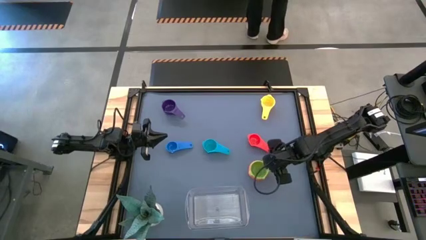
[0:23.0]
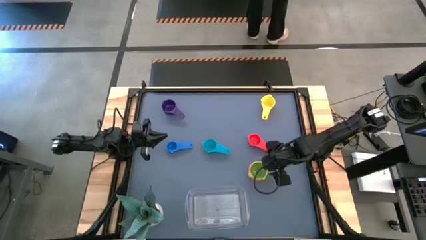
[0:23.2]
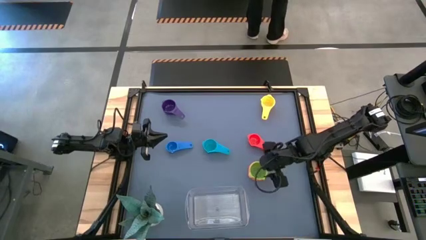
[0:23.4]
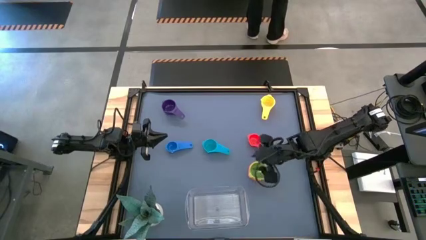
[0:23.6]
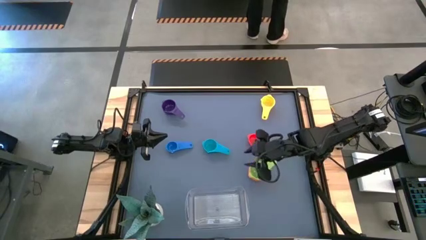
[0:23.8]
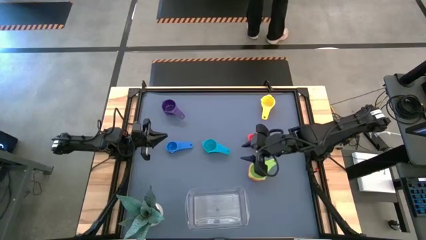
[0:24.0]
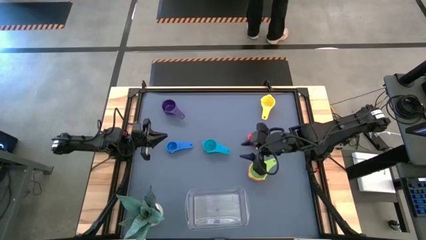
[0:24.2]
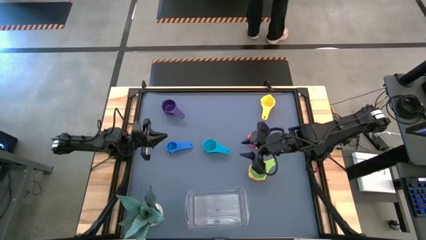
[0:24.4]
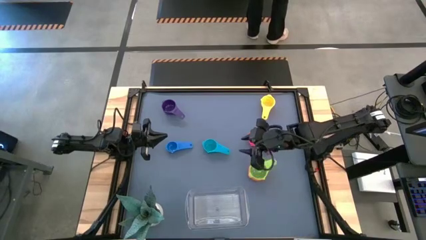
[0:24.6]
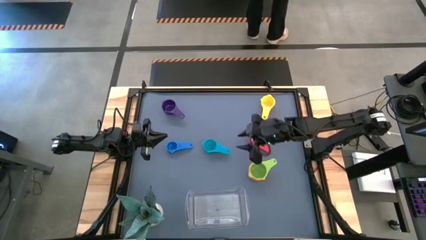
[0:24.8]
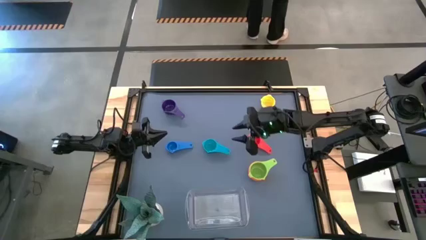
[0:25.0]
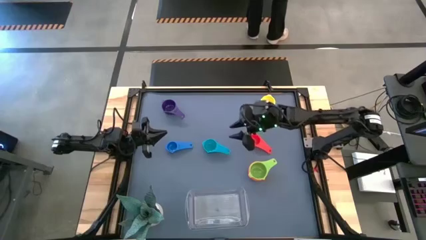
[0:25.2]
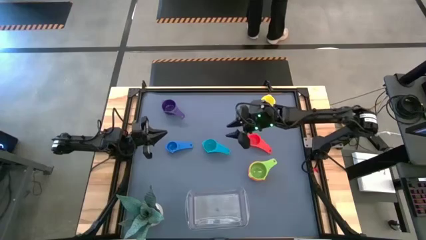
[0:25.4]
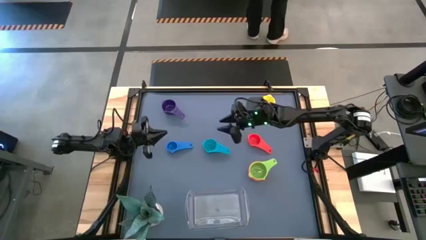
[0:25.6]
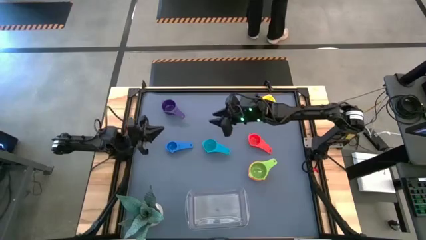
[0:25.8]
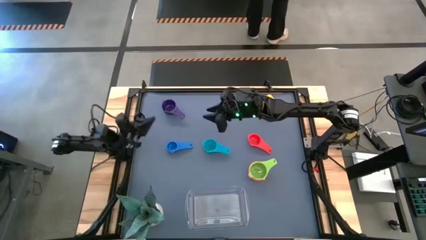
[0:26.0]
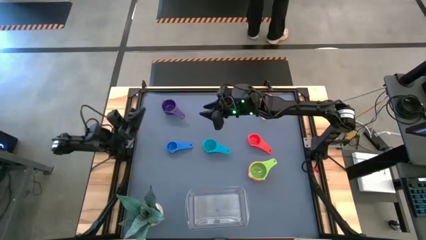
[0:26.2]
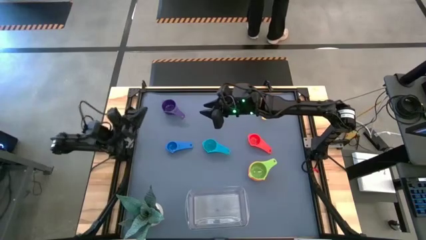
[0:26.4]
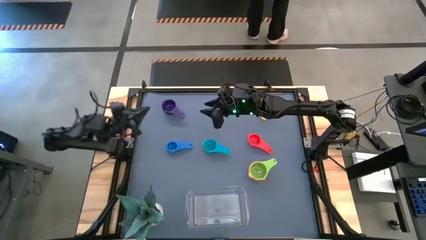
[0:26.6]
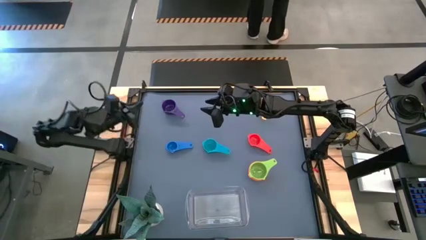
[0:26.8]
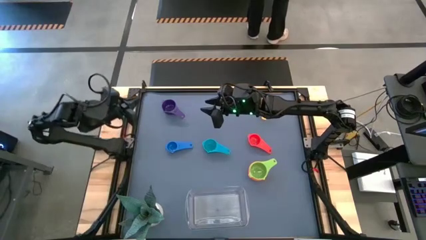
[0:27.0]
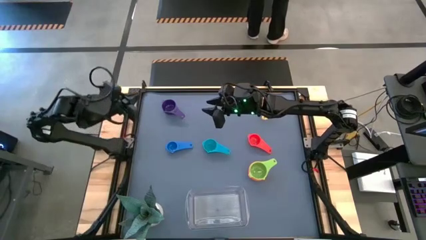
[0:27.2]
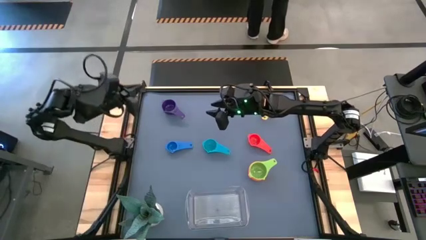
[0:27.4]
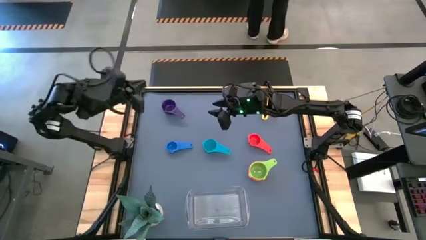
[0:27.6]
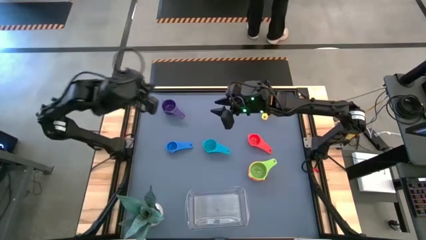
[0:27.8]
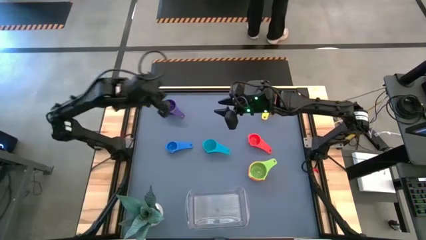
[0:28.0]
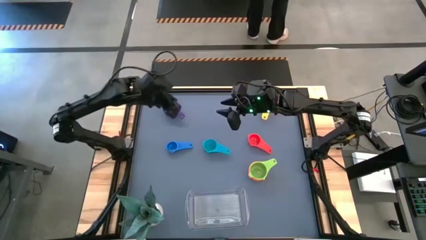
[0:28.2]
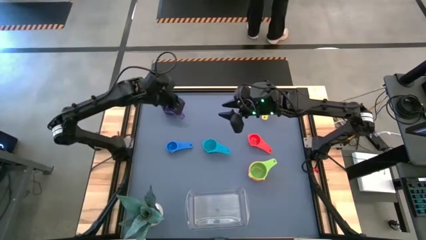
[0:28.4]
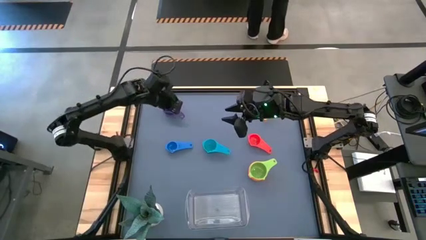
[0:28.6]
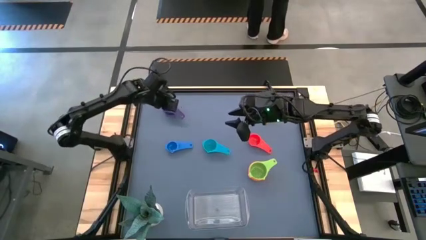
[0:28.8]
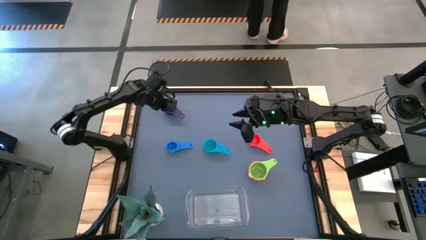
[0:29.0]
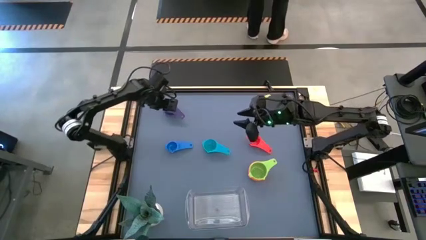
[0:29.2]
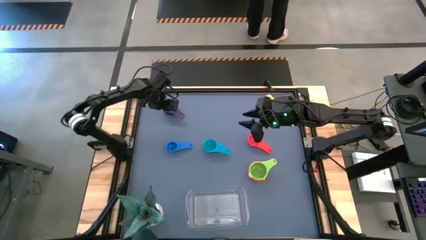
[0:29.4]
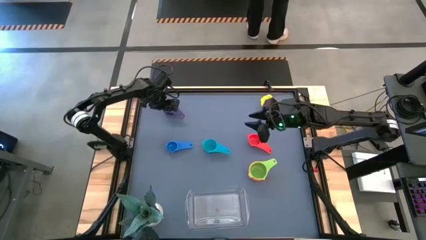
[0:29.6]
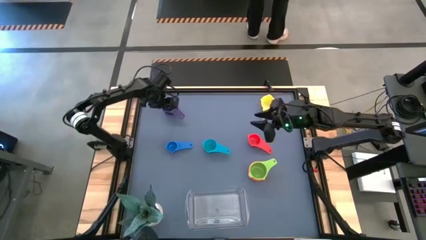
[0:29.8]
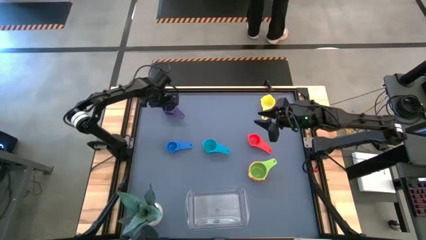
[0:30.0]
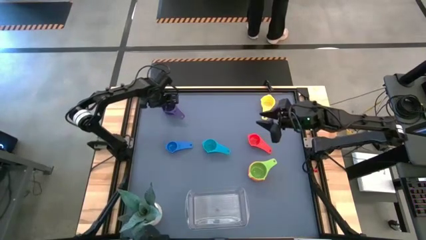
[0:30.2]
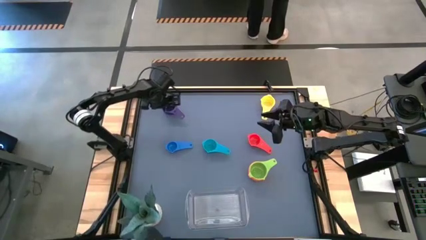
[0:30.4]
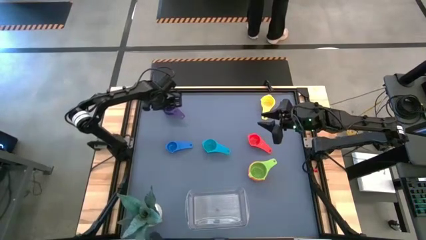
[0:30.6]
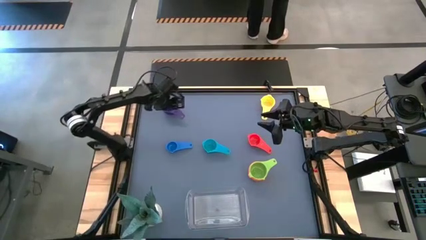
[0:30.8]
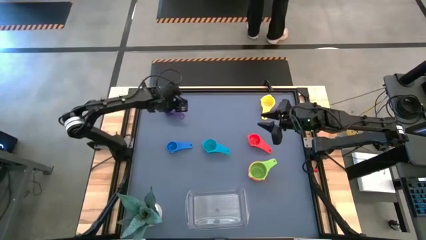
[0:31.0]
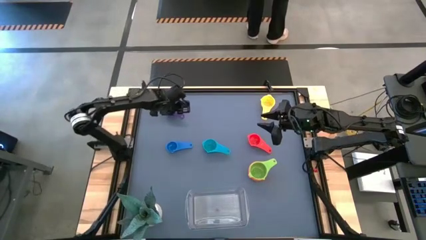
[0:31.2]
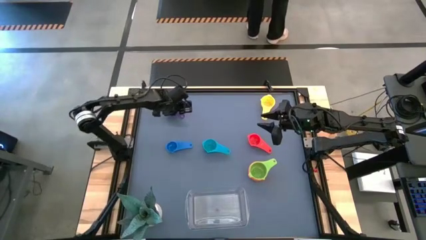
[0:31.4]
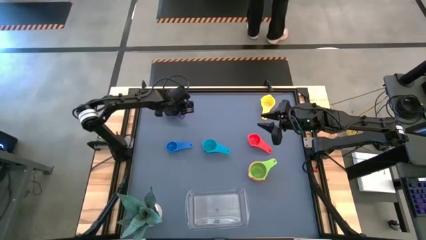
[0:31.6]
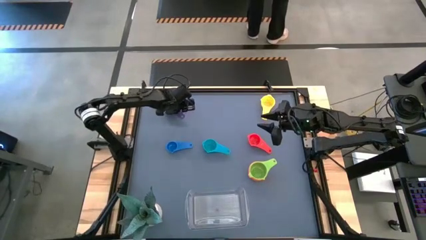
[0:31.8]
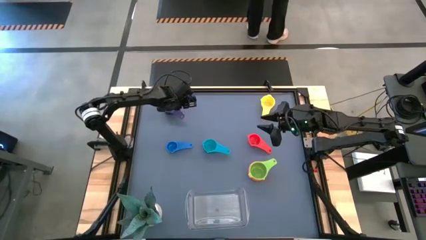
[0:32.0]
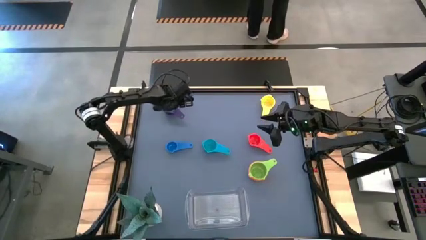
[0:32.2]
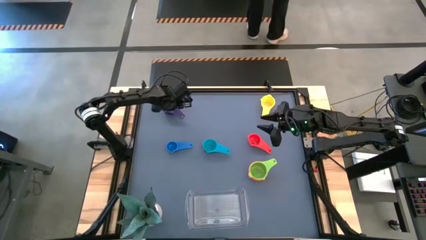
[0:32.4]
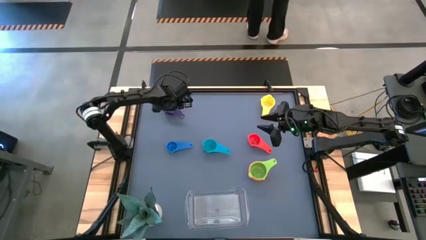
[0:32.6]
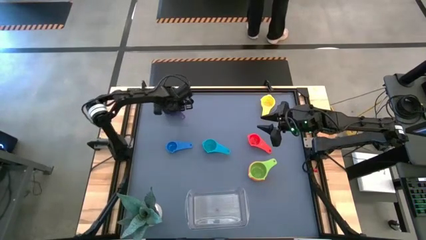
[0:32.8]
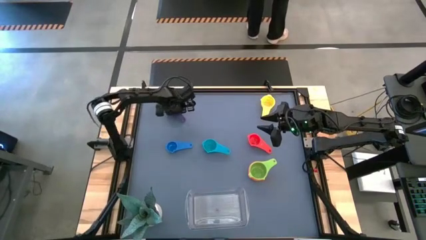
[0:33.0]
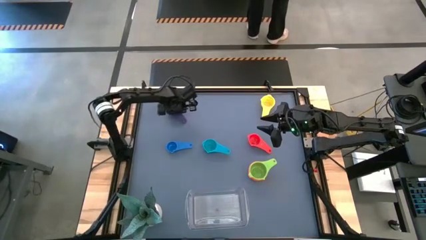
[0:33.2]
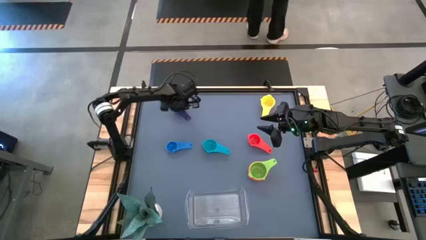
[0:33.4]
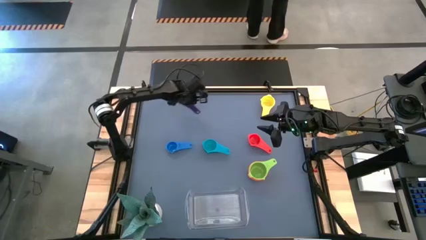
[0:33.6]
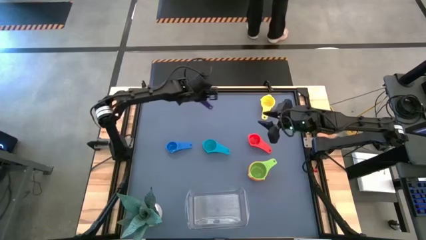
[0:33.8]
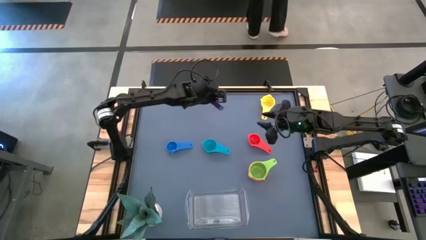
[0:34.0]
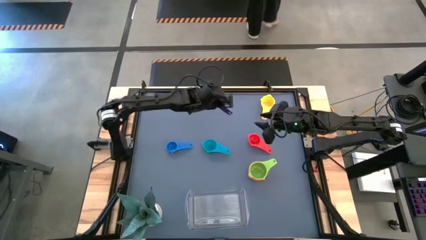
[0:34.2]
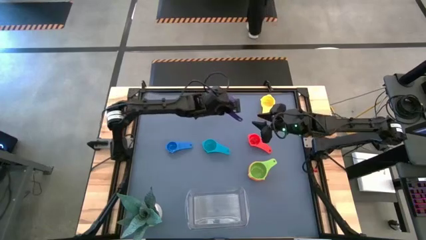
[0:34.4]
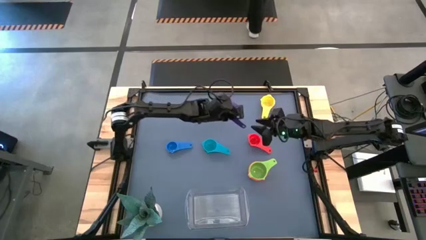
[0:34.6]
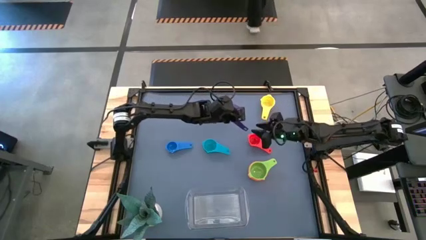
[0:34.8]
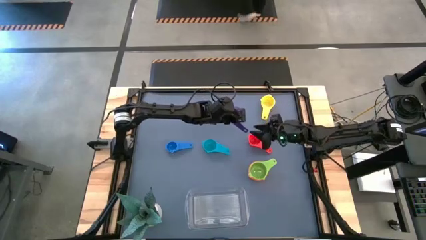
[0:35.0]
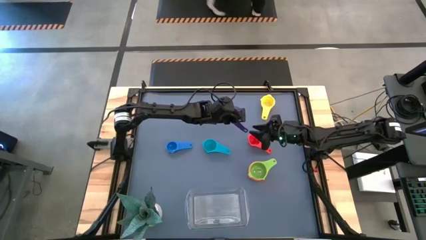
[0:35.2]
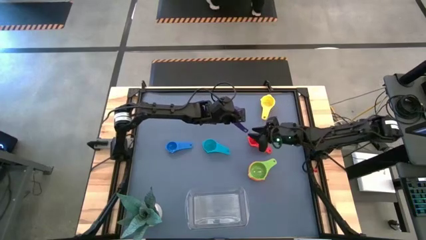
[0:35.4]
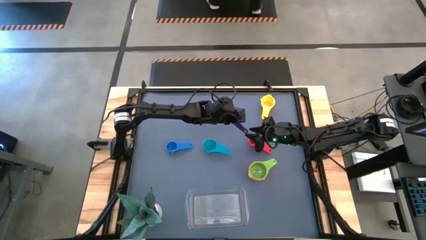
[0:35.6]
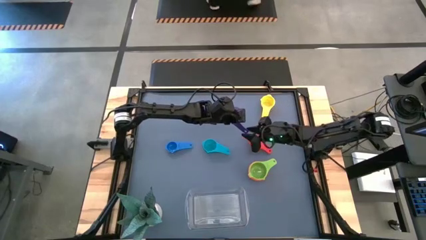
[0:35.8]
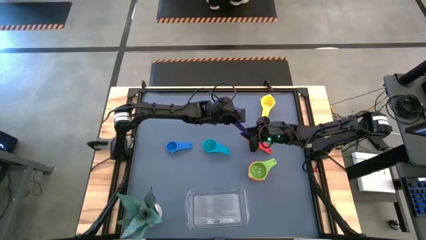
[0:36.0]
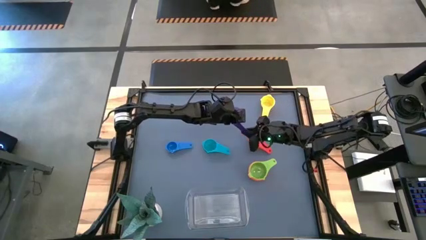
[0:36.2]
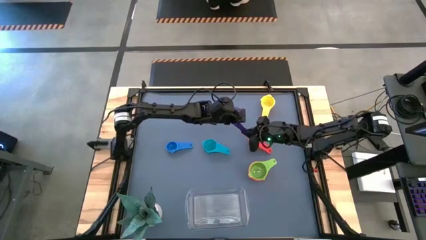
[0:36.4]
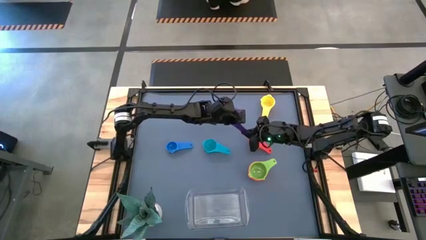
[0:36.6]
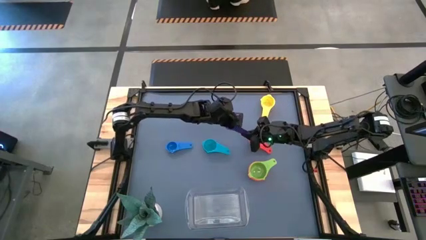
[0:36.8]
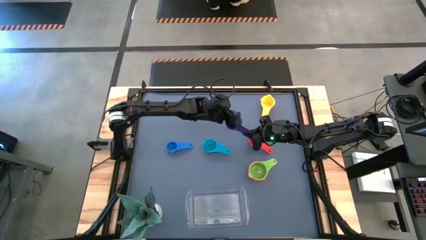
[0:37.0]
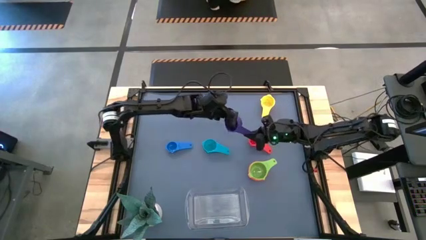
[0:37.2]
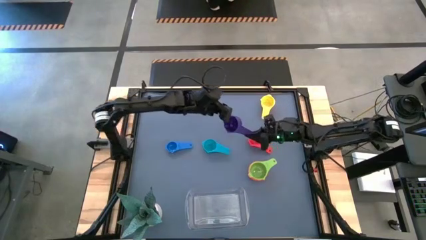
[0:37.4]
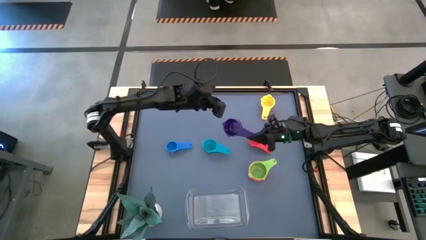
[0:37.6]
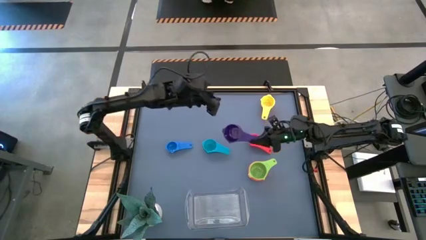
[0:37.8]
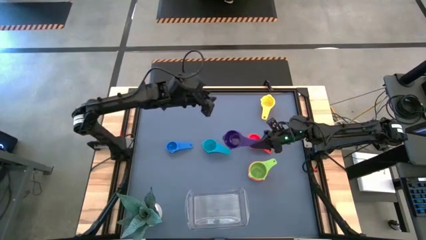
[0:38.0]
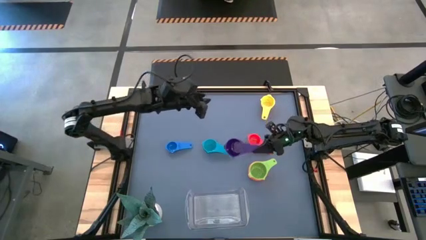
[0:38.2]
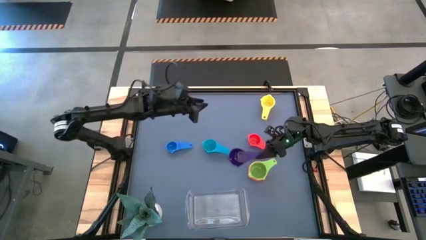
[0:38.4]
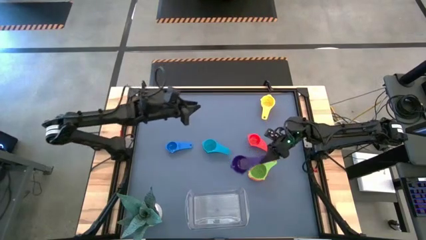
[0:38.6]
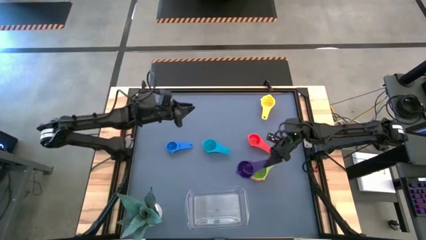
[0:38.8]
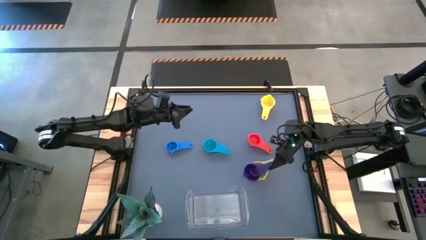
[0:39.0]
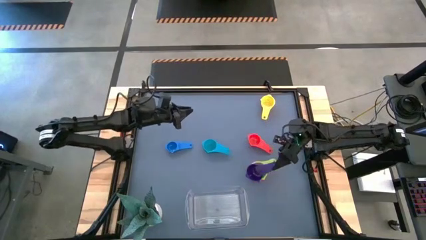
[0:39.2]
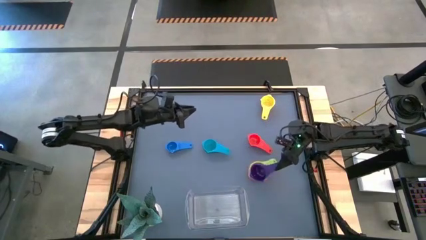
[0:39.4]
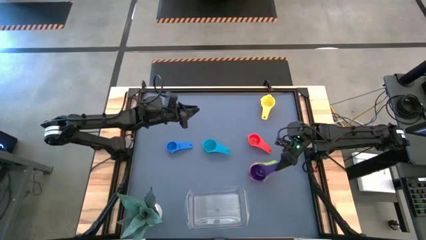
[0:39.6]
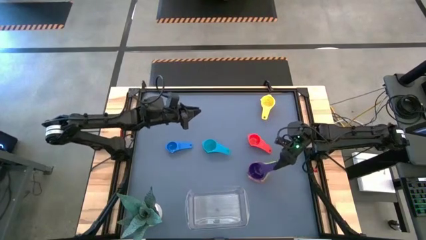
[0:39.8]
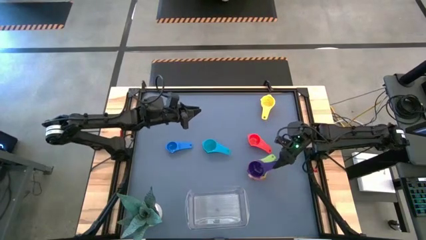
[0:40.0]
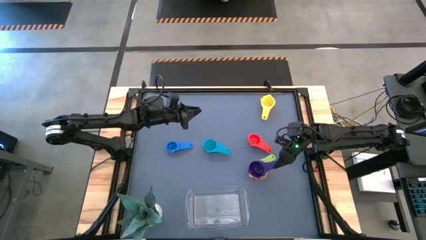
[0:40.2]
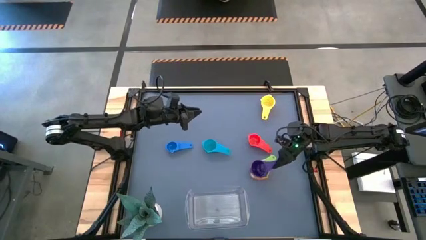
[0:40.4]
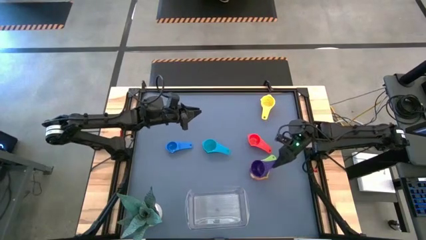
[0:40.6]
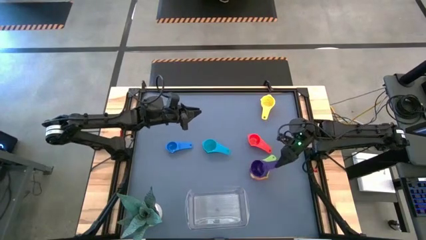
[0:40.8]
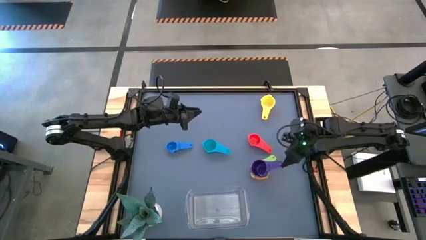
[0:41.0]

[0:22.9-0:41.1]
Task: Nest measuring cups in basket
Stack the purple measuring cup on top of the green measuring cup
